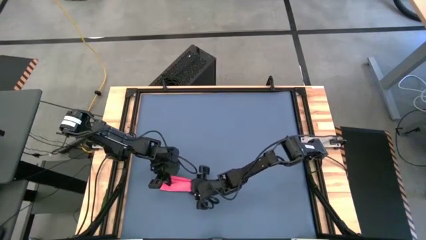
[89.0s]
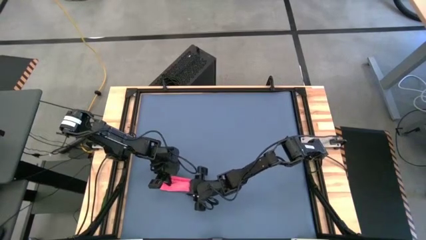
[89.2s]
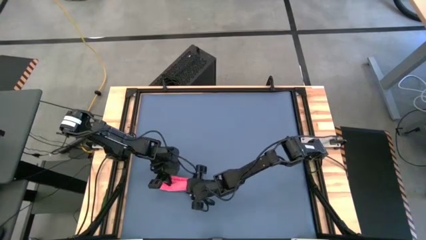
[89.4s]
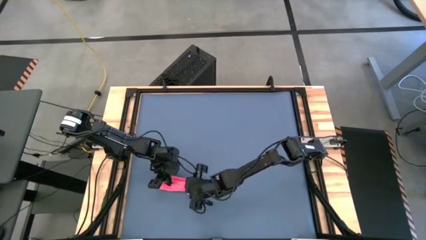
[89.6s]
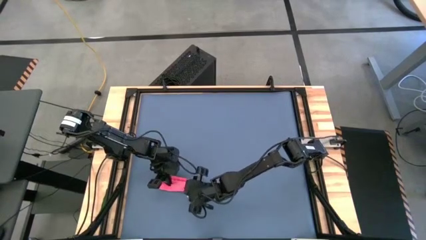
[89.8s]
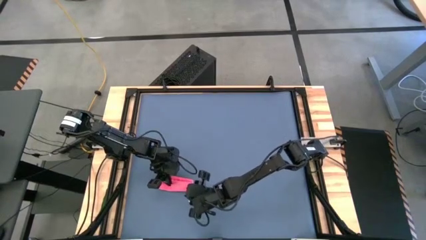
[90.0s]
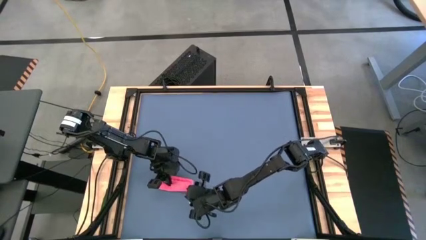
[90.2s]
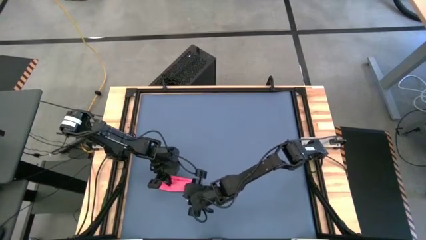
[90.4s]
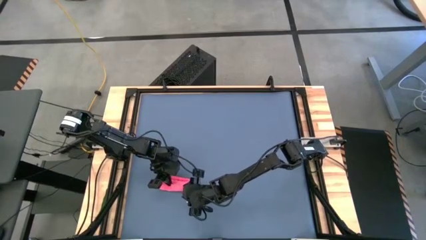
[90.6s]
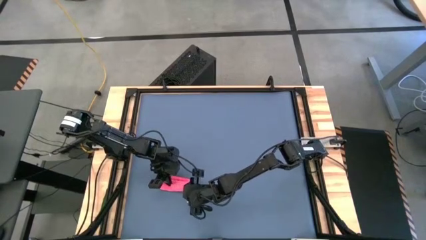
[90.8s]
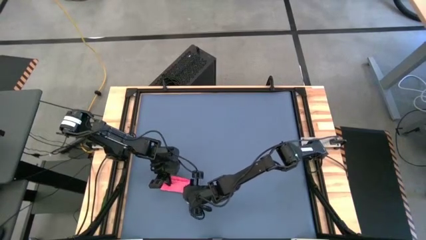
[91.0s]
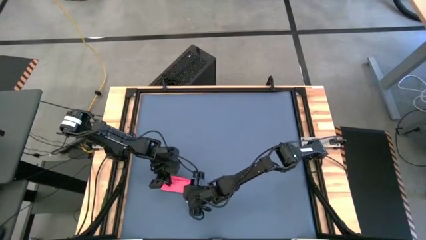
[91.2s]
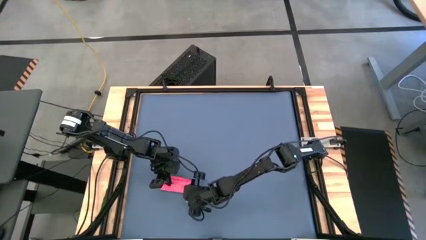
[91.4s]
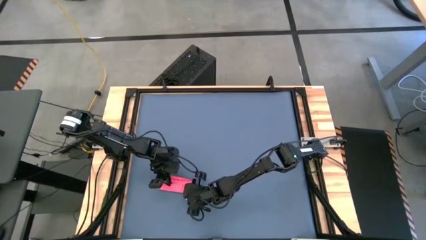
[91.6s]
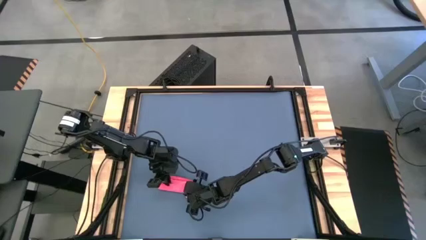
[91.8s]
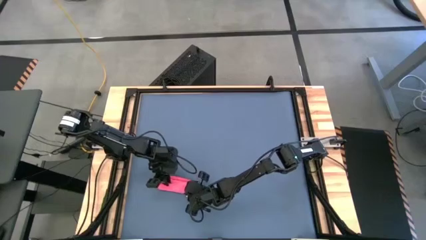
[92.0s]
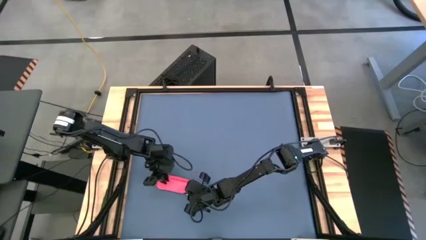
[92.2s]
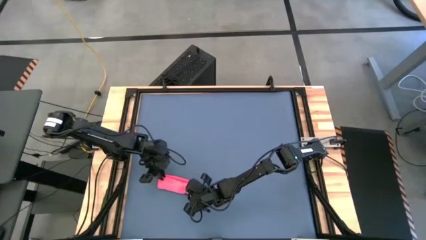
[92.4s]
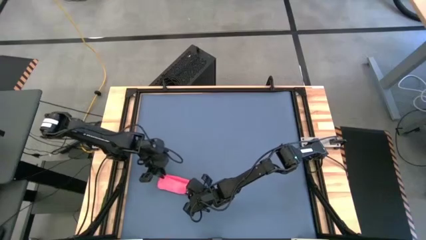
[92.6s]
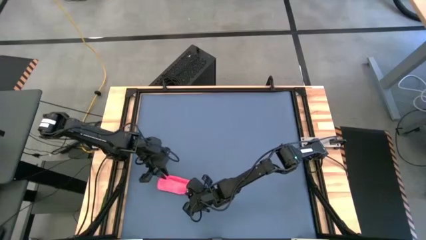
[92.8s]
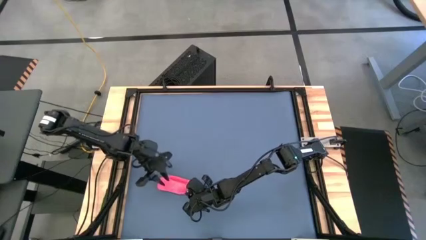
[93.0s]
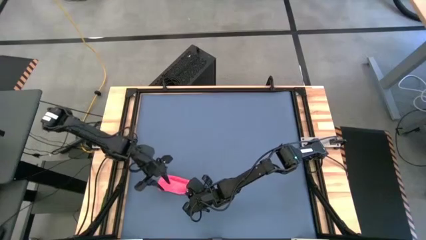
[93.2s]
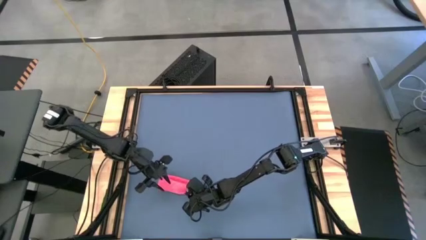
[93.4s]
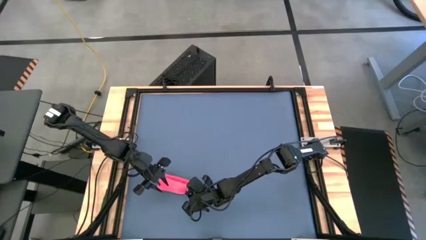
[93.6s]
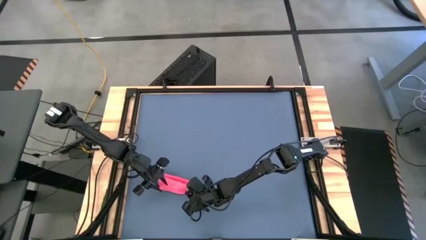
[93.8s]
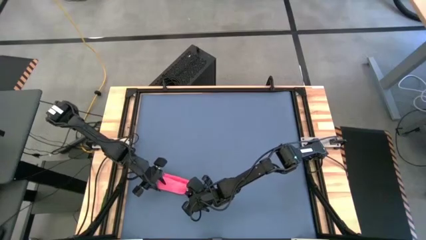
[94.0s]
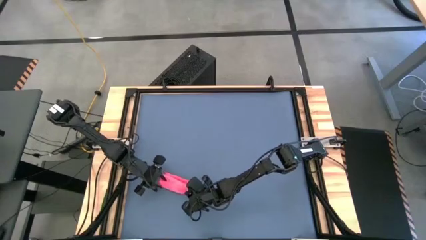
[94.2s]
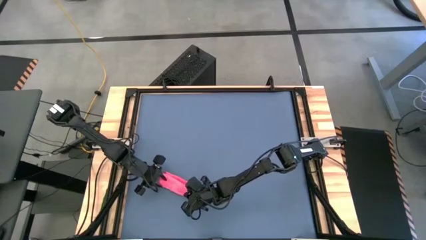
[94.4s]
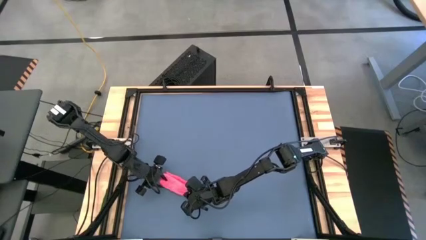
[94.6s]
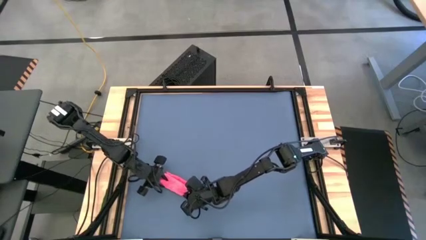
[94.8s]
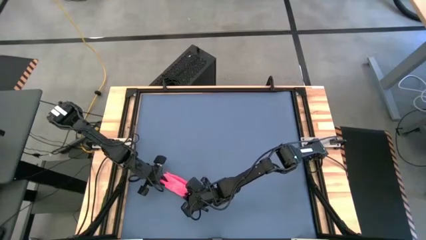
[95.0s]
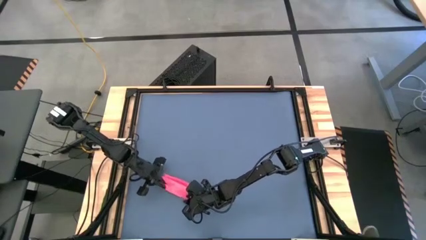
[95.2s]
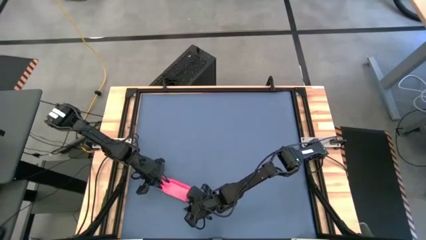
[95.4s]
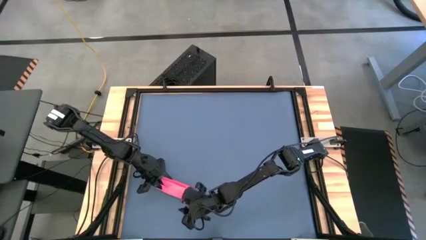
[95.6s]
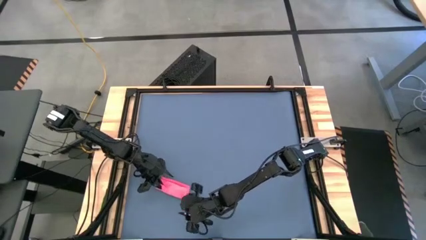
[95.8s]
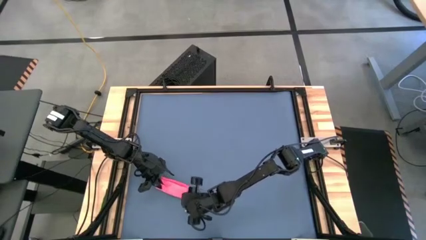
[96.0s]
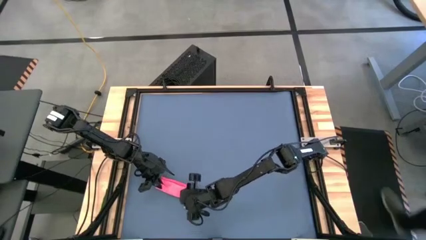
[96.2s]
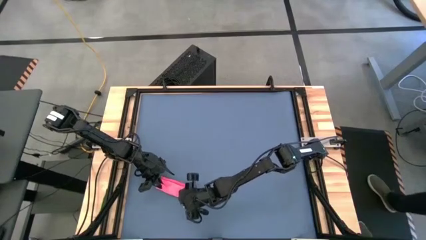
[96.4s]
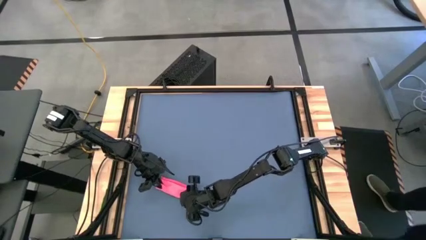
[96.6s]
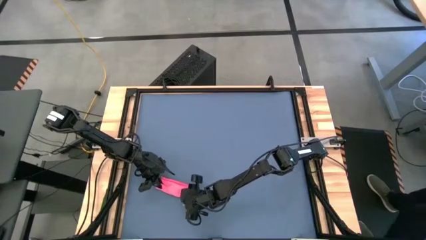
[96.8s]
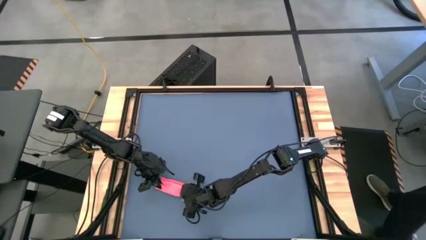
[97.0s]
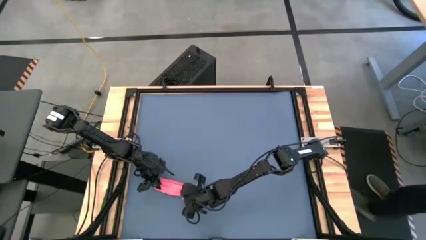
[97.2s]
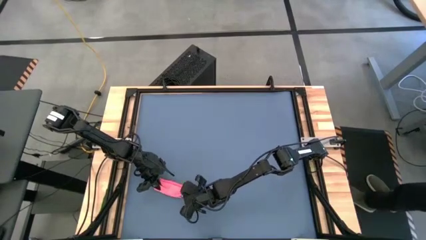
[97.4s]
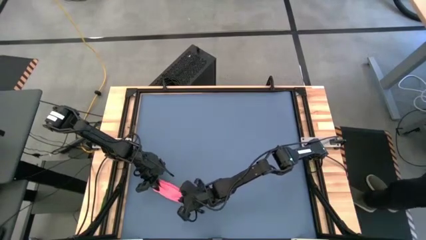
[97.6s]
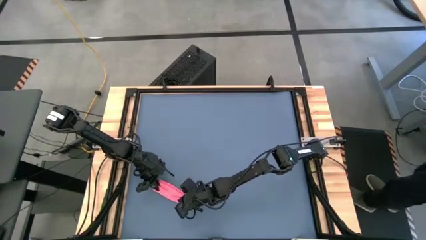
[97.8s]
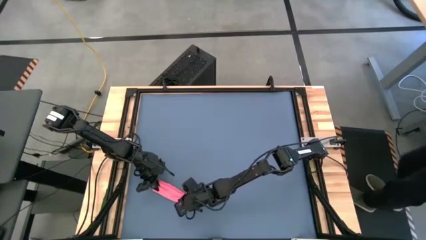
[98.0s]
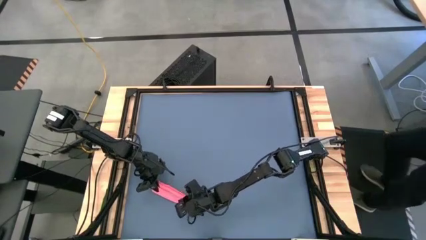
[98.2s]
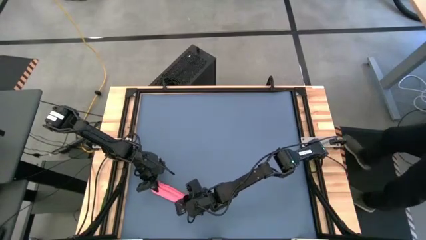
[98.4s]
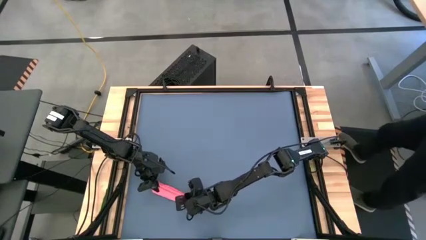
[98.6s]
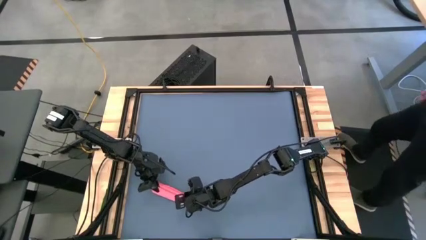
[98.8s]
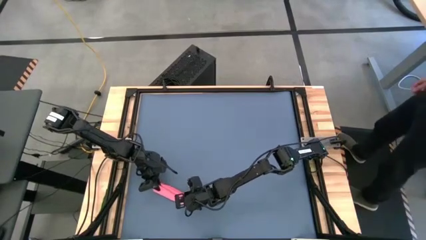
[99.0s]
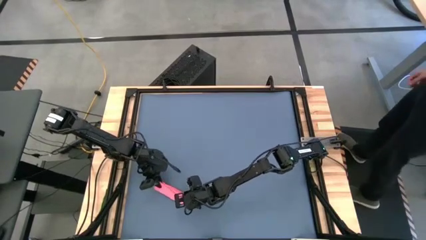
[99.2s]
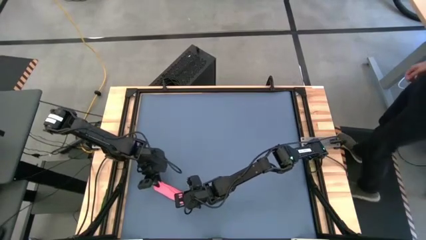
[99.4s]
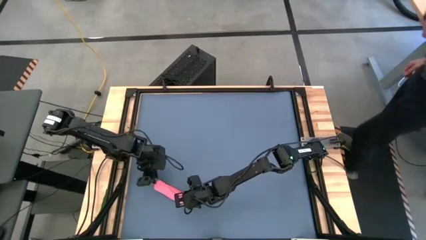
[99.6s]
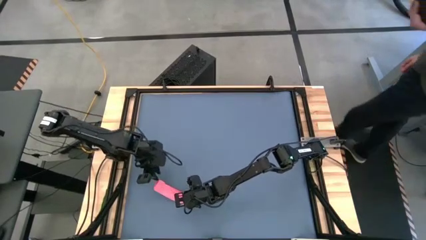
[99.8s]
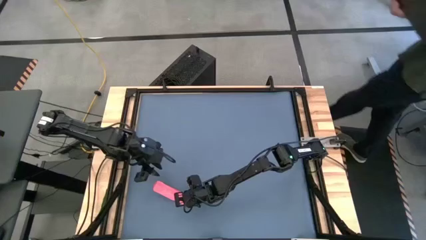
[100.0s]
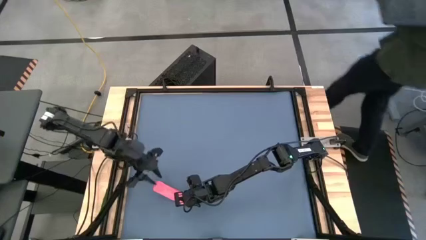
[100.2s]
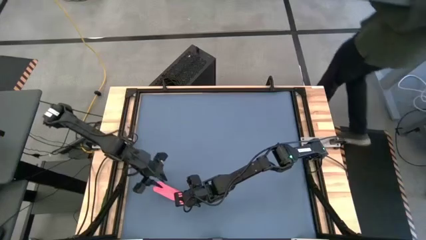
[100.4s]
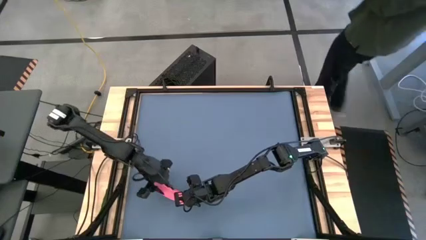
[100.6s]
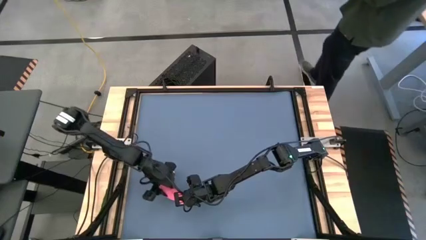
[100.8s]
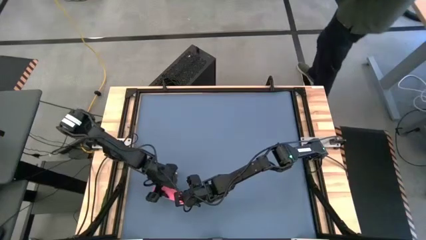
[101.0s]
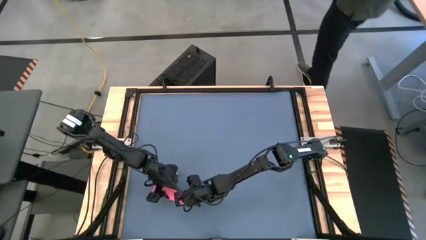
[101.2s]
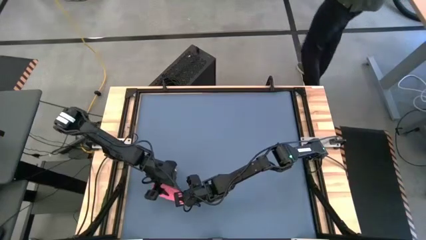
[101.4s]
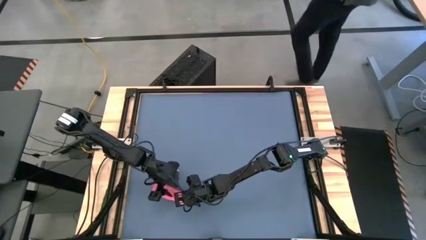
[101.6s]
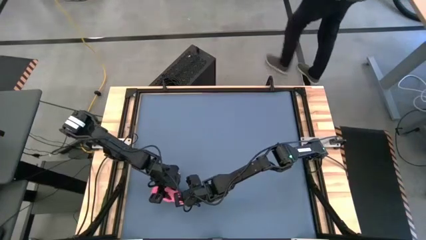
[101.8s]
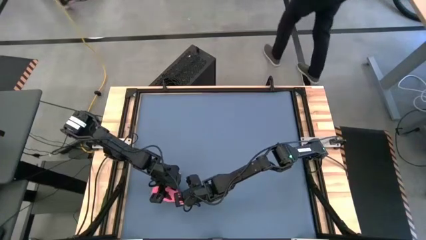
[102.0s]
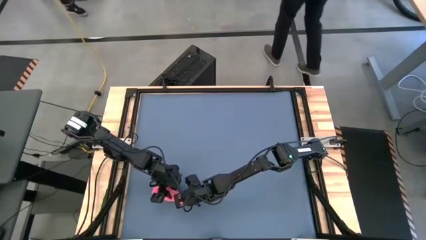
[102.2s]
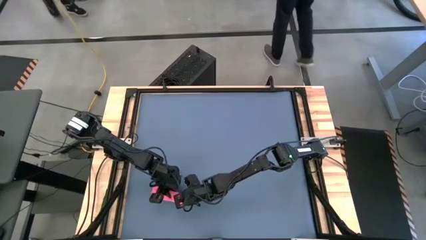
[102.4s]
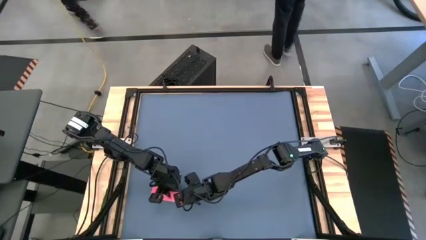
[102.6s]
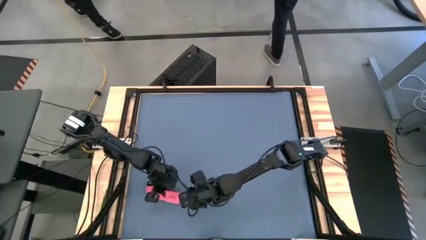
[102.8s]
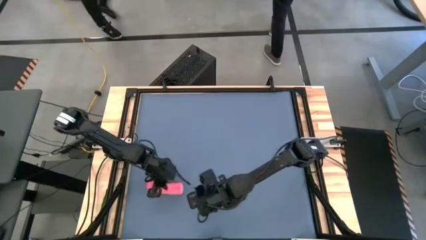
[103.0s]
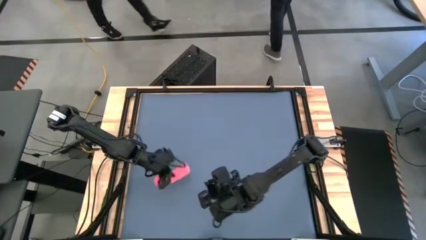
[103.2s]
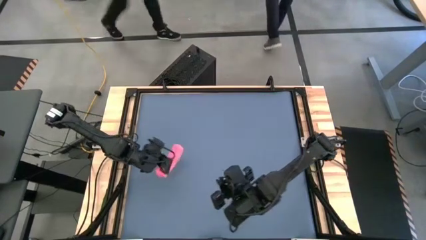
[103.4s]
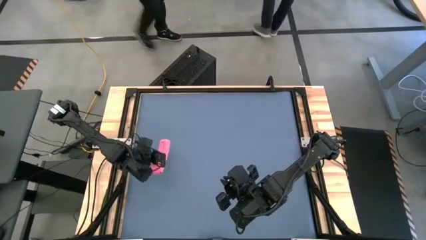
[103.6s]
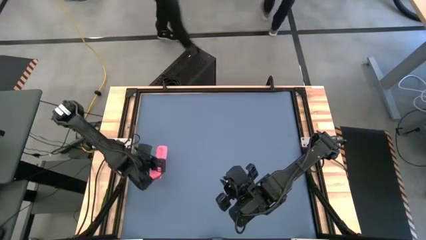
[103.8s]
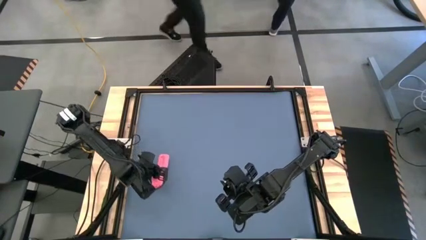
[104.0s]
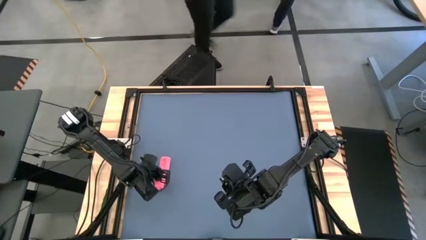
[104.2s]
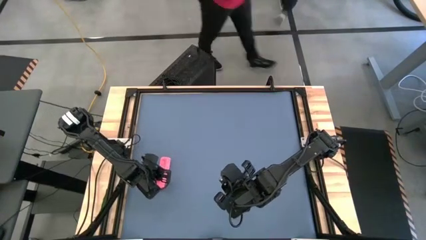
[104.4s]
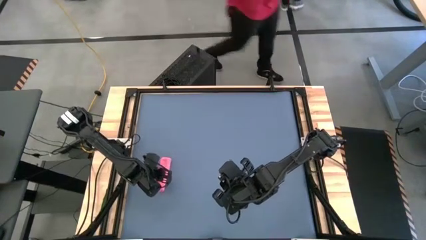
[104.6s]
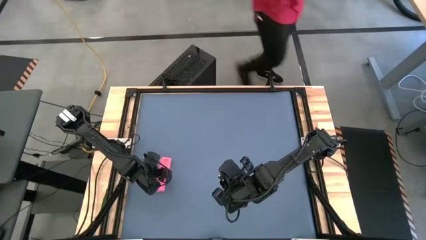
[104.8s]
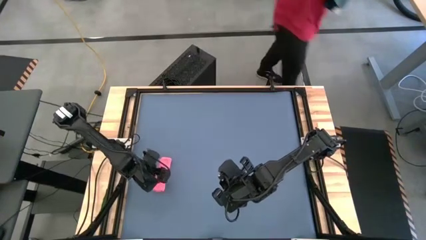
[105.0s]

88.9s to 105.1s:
Task: Roll towel
Roll the red microfiber cloth
